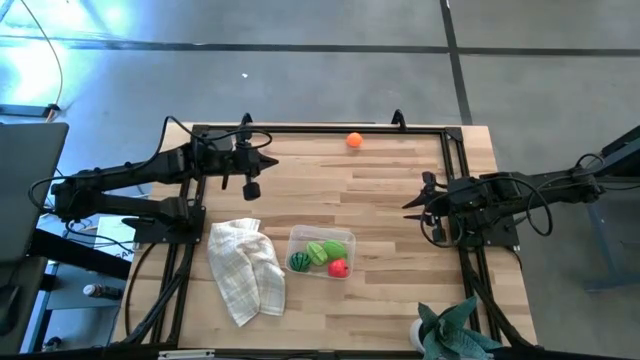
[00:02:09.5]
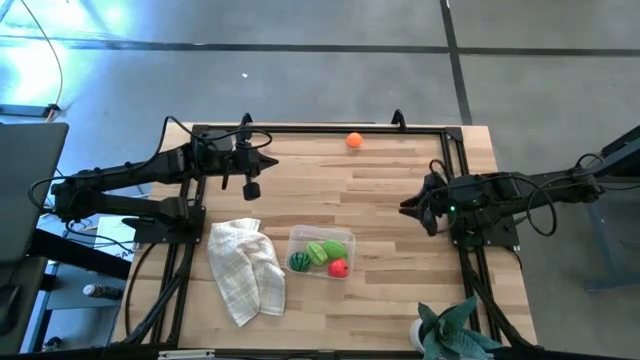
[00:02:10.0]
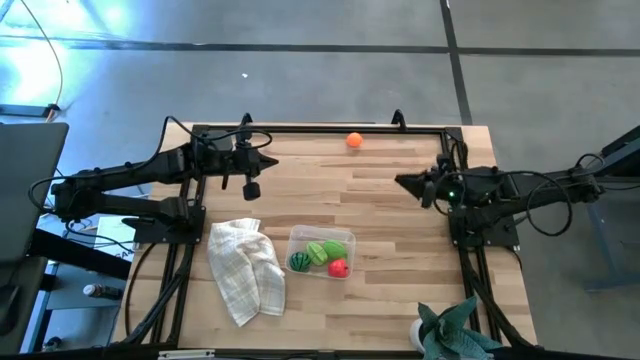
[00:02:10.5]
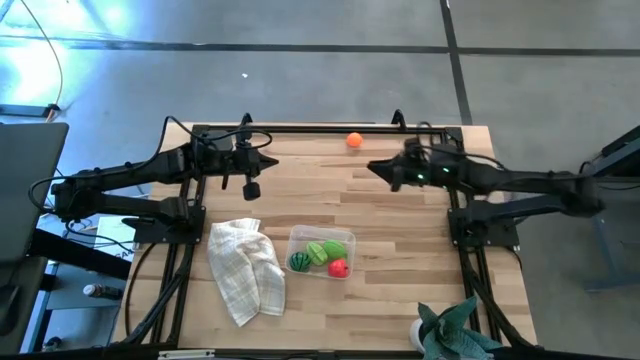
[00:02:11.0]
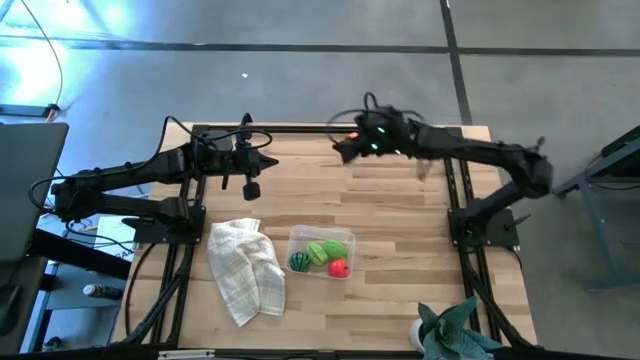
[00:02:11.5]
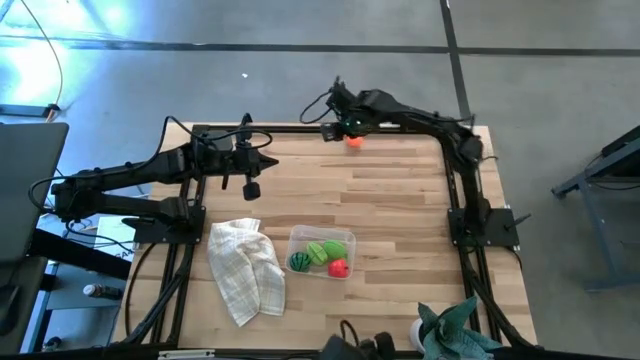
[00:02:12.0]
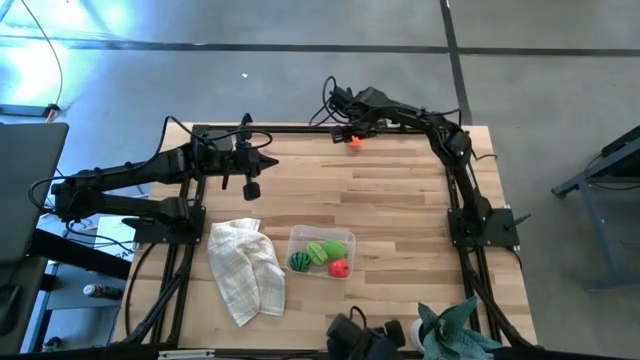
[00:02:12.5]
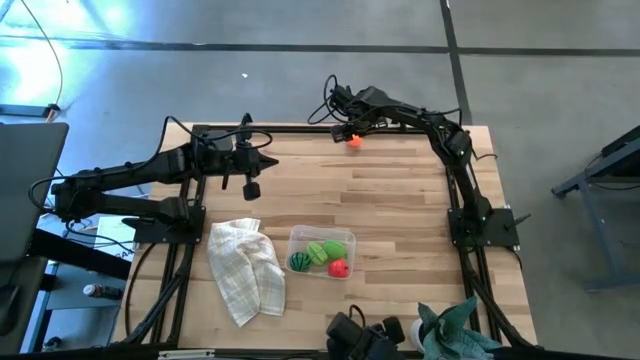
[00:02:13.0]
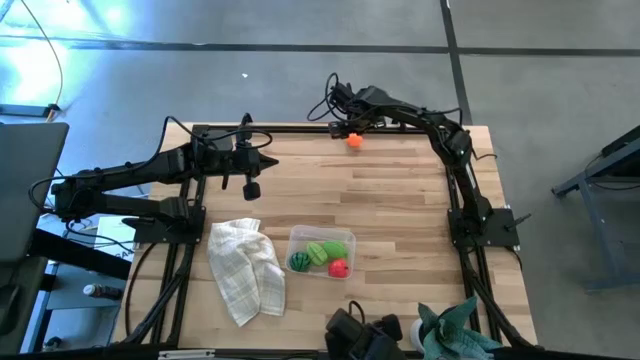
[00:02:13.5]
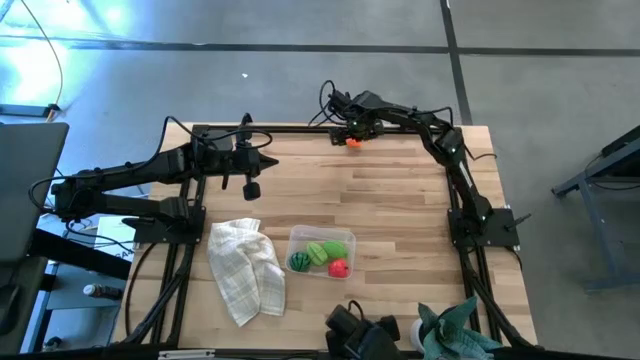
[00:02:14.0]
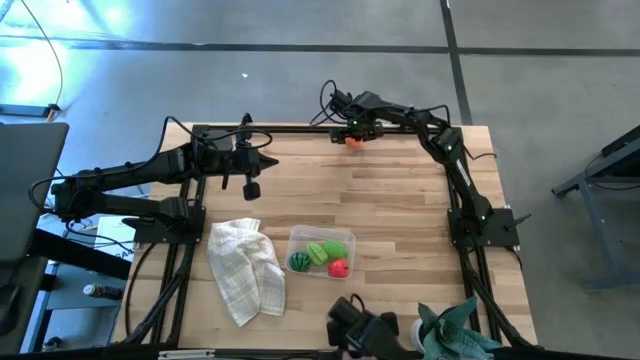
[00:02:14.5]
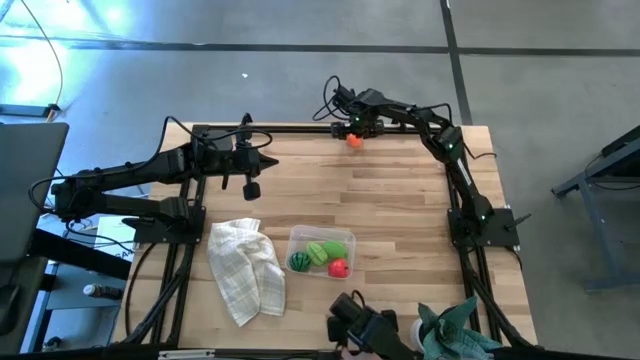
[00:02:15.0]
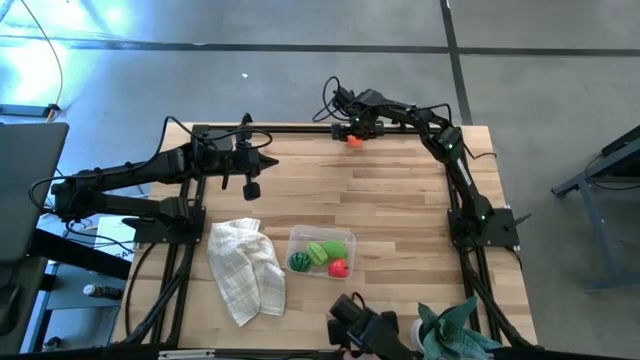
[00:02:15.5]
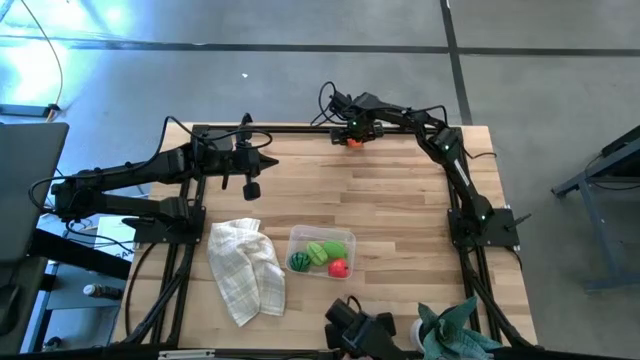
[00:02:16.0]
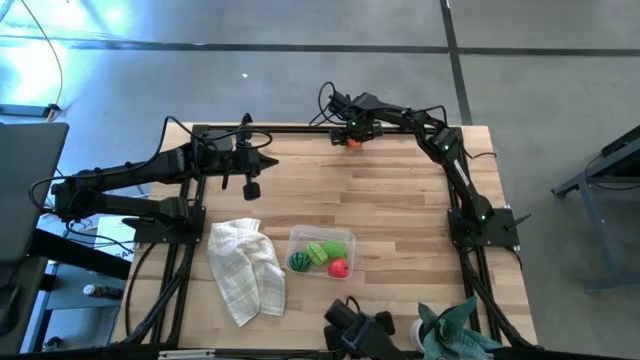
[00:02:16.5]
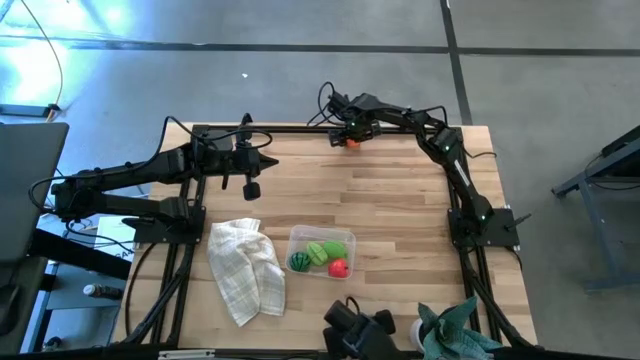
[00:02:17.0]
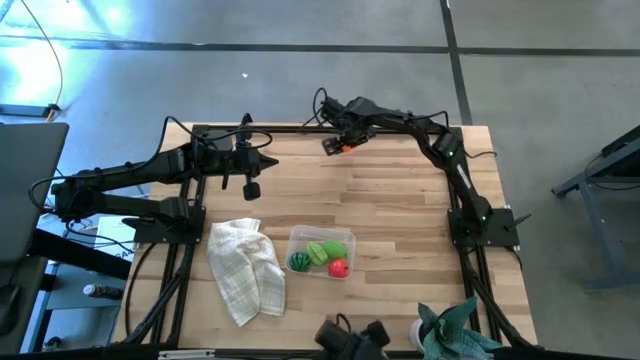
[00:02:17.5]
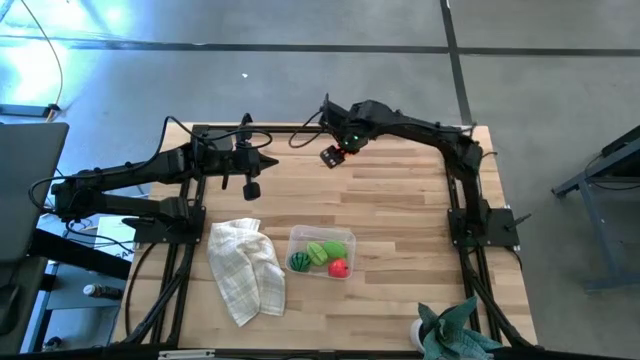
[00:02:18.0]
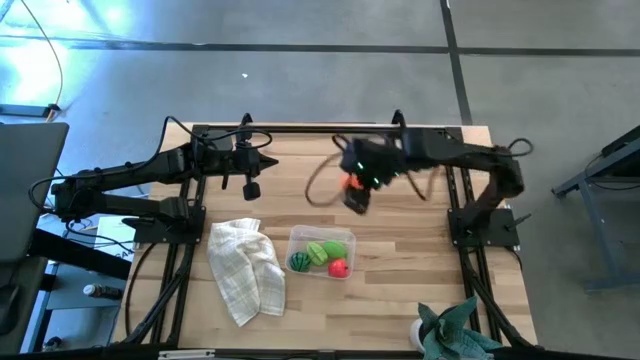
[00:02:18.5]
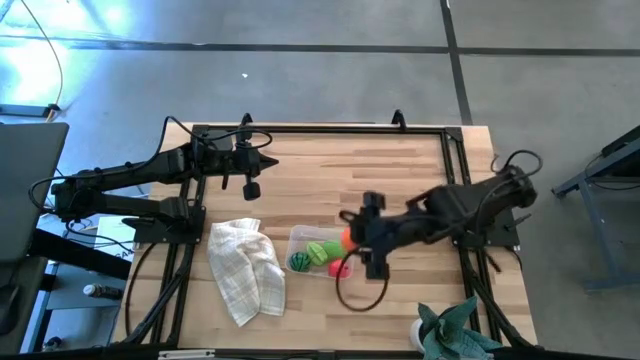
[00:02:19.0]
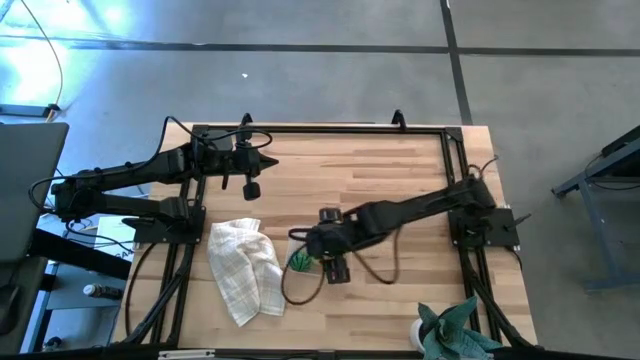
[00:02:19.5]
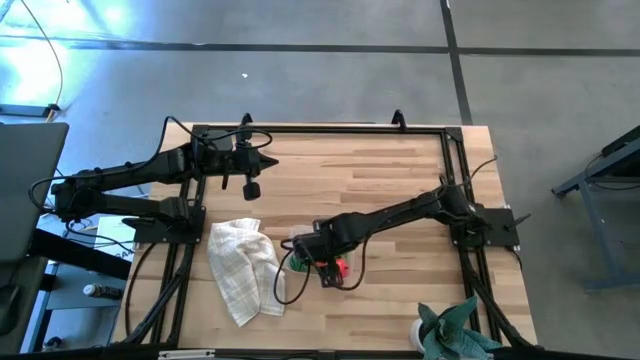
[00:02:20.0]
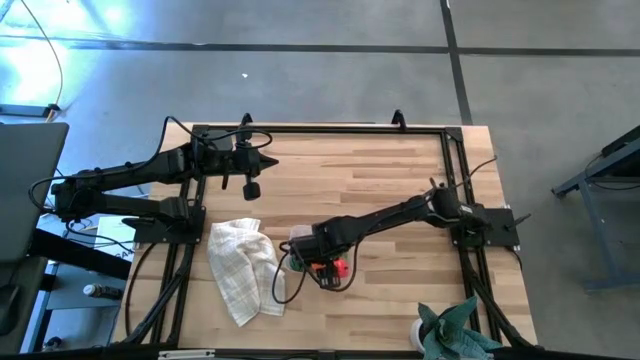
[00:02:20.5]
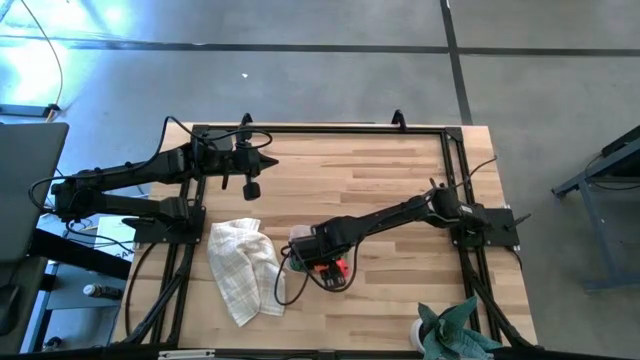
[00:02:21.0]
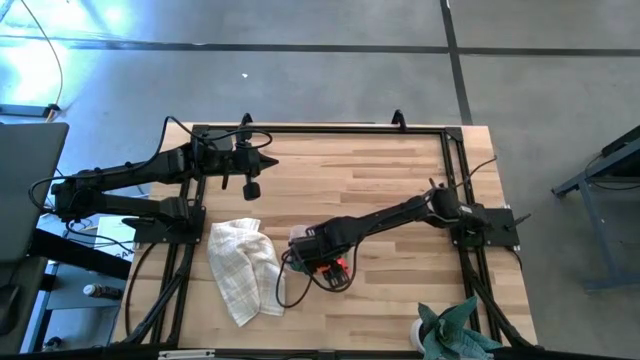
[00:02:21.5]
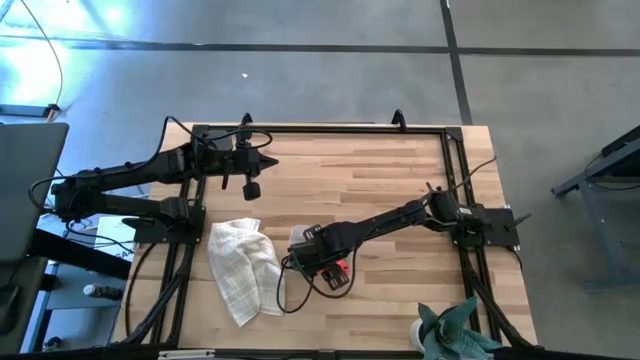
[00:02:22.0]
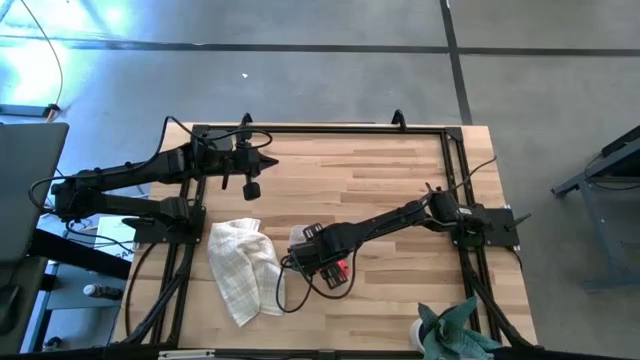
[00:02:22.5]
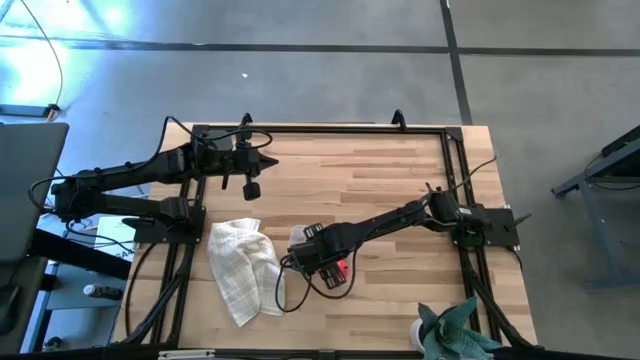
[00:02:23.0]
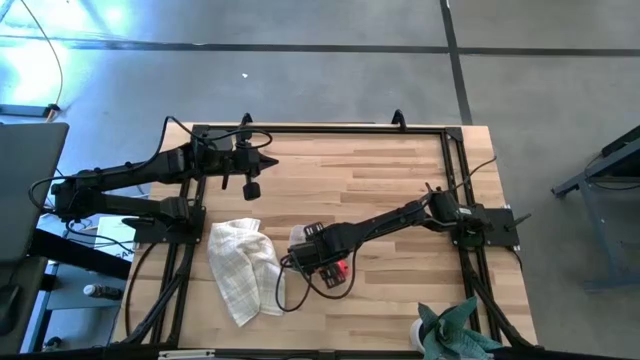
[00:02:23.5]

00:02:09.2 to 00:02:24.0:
Task: Pick and placing Produce into tupperware
Put the orange tangerine into the transparent bin

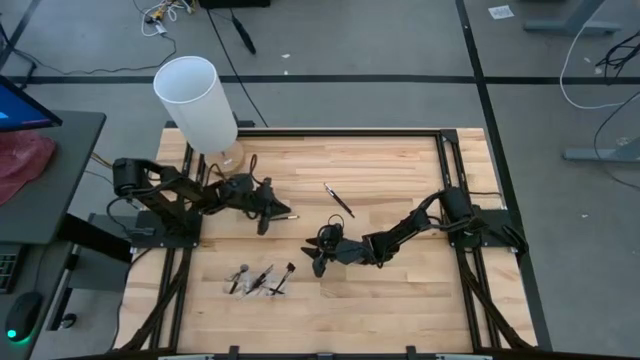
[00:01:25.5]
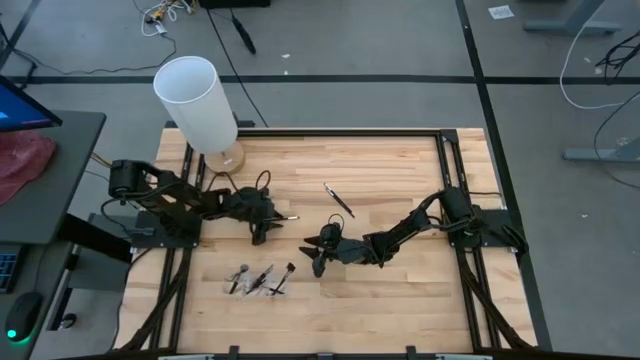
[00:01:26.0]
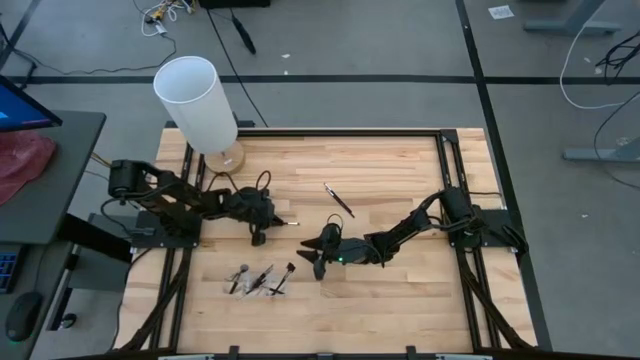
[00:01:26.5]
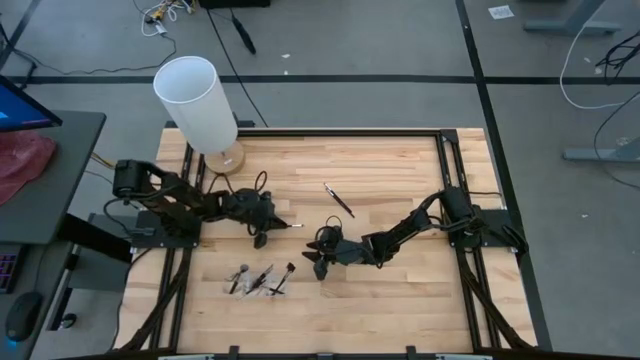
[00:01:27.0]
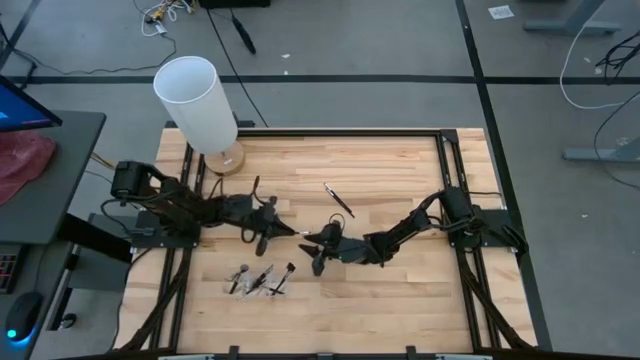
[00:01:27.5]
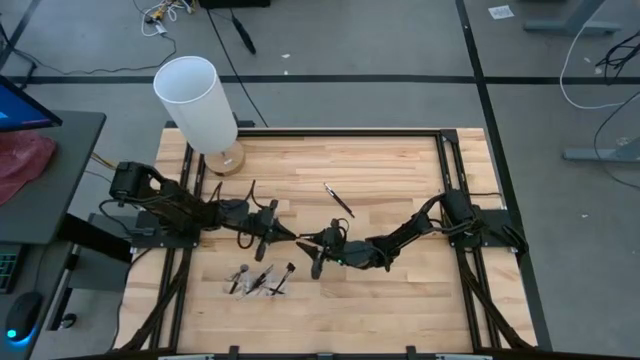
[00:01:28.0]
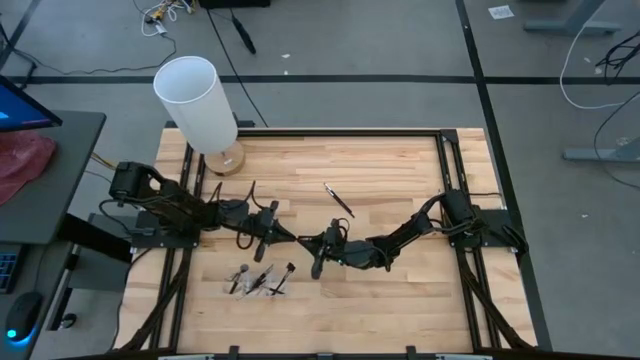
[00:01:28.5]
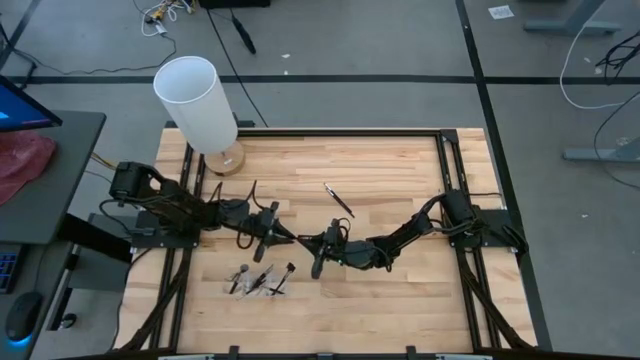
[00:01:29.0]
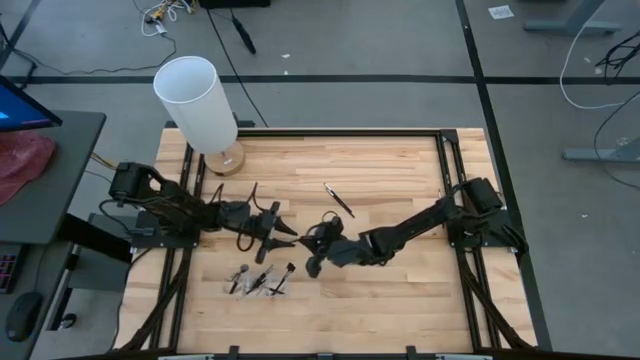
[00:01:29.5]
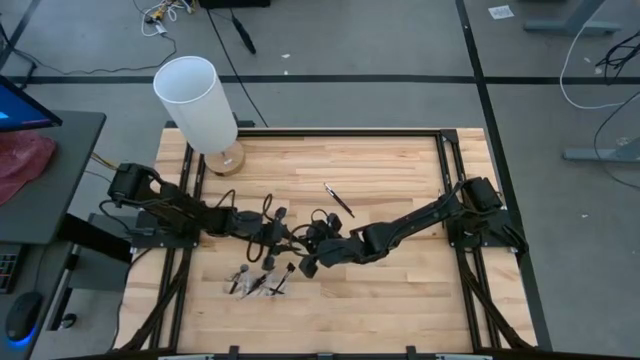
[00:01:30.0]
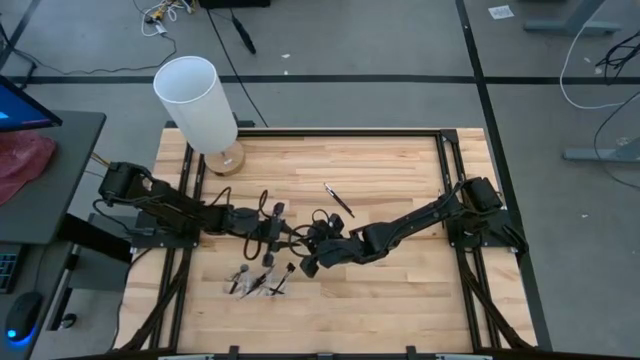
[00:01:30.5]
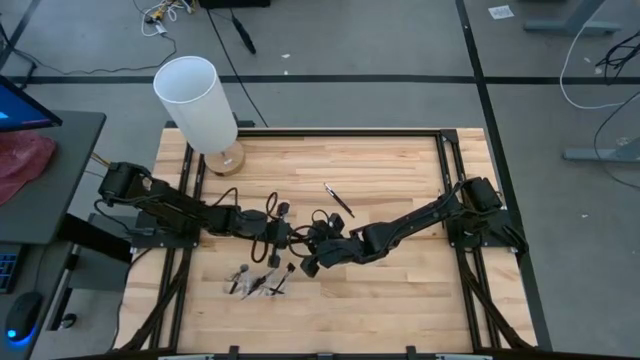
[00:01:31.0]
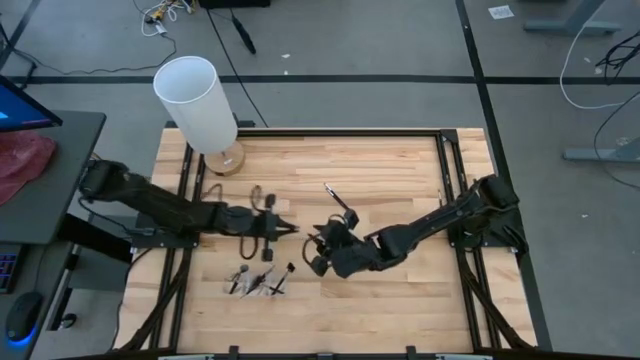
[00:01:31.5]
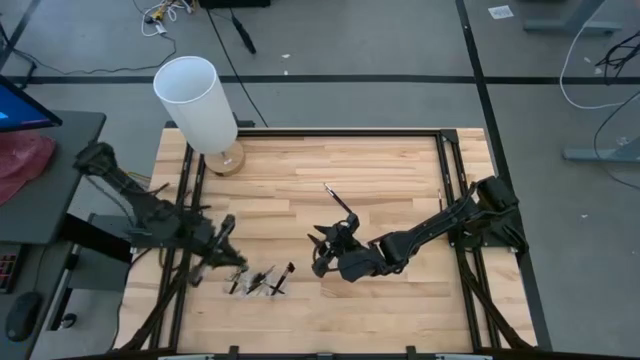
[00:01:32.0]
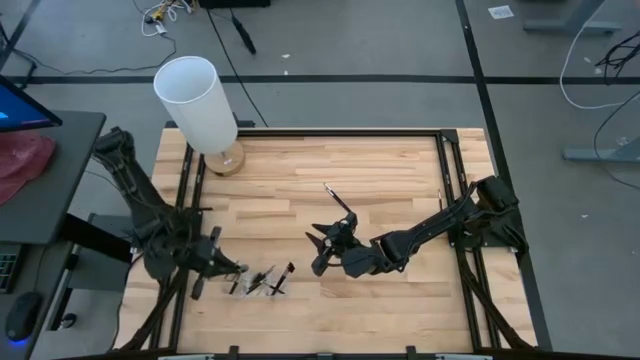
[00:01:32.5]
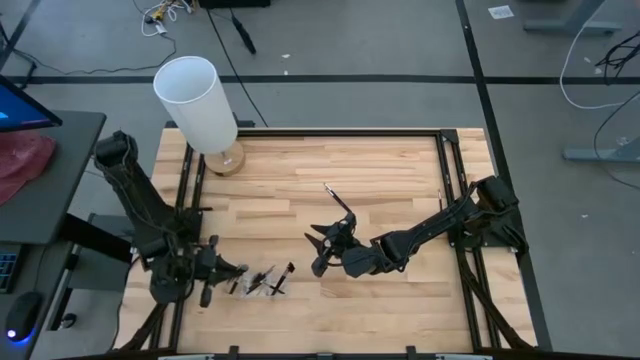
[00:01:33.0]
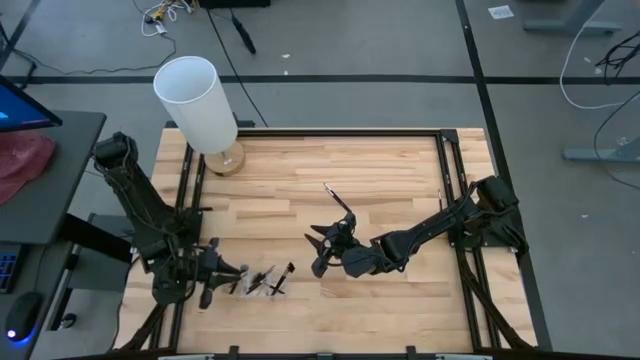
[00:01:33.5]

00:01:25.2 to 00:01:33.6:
Task: Put items in baskets/containers
Put the eyeshadow brush into the transparent organizer
